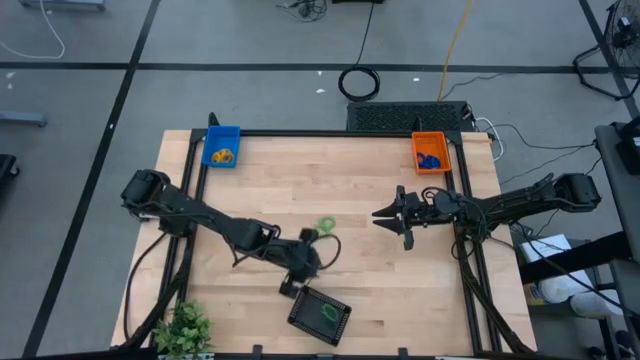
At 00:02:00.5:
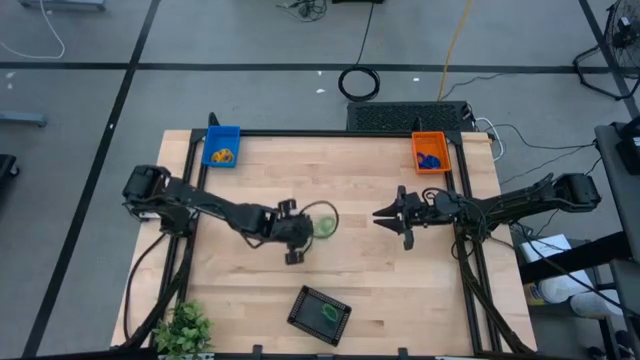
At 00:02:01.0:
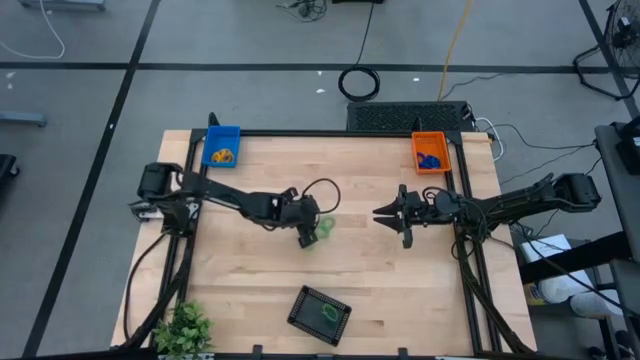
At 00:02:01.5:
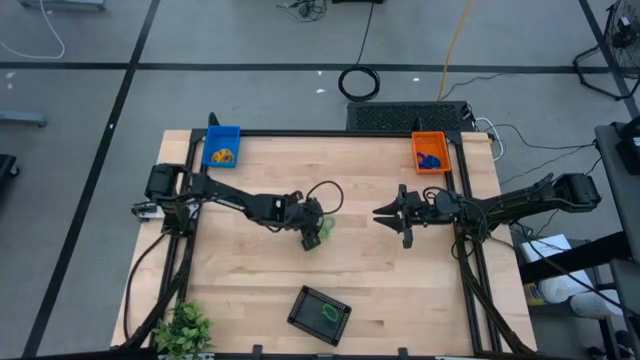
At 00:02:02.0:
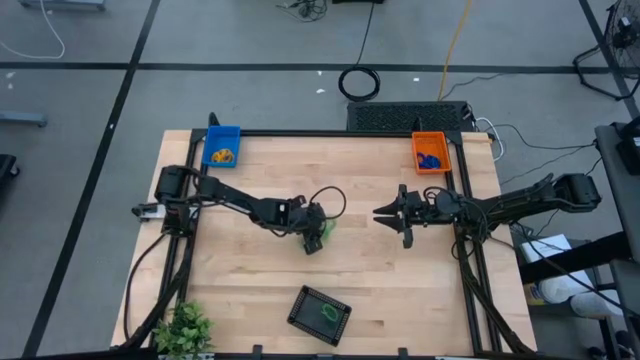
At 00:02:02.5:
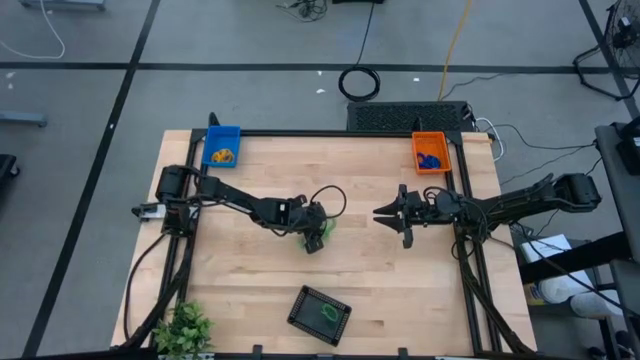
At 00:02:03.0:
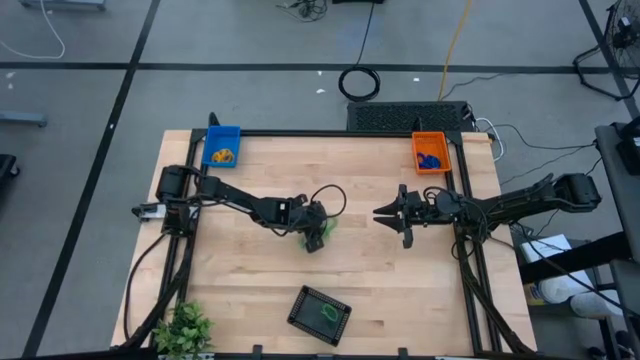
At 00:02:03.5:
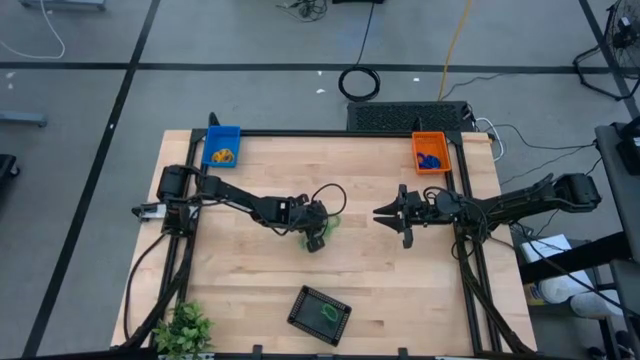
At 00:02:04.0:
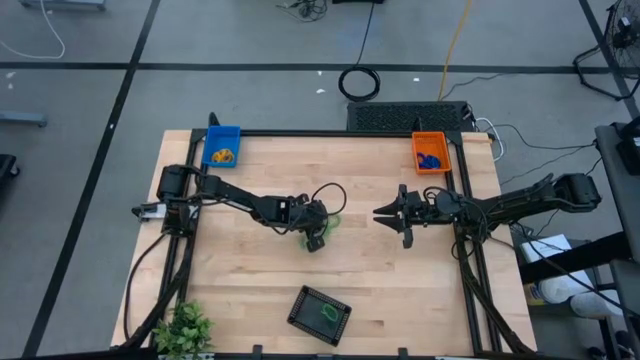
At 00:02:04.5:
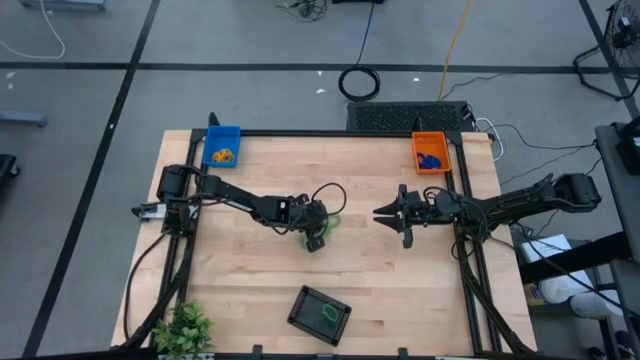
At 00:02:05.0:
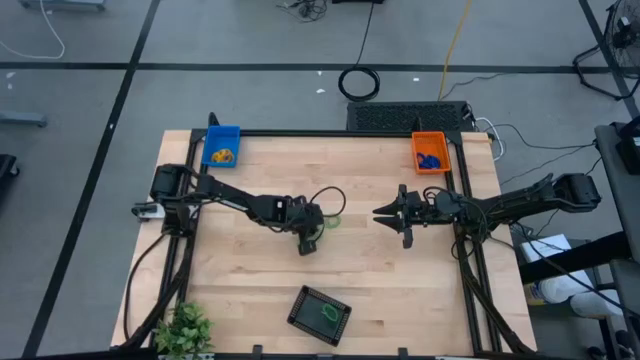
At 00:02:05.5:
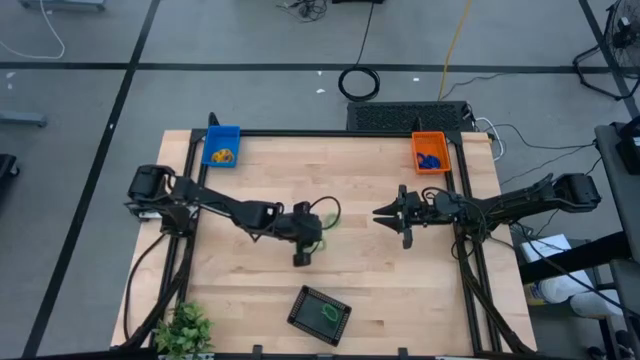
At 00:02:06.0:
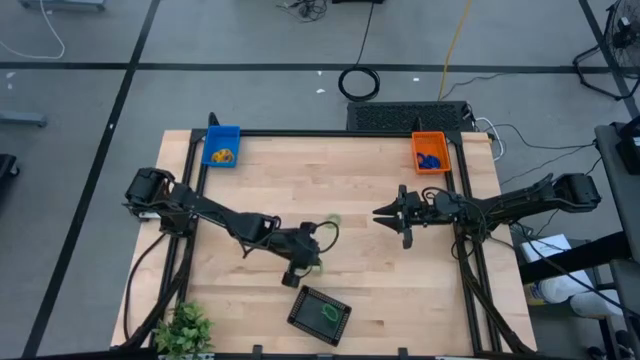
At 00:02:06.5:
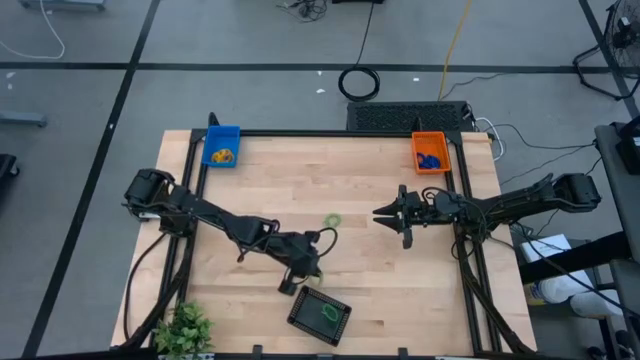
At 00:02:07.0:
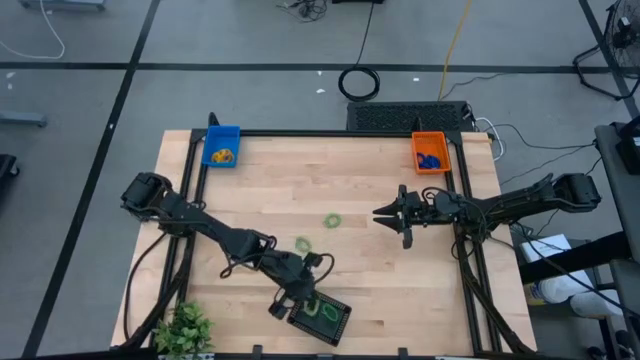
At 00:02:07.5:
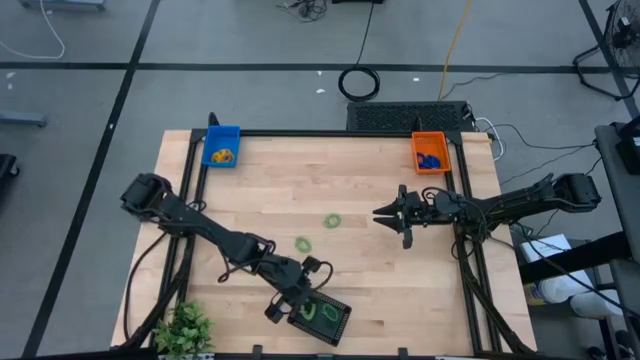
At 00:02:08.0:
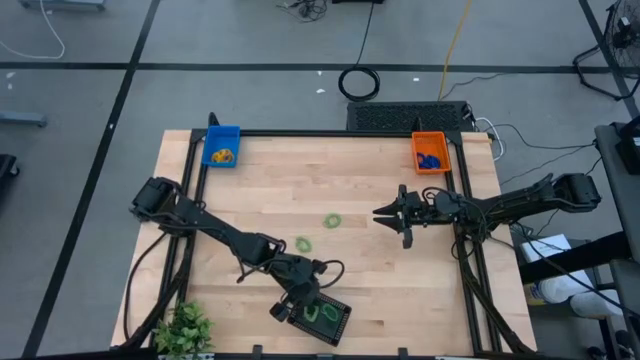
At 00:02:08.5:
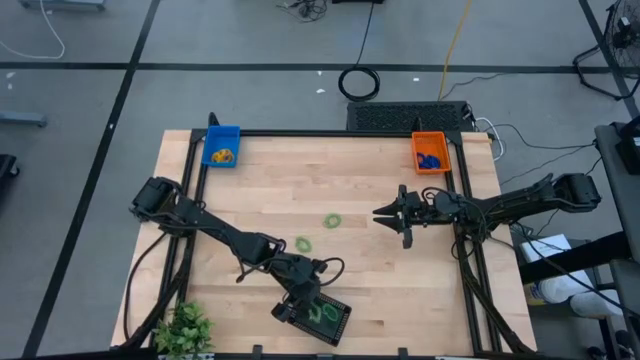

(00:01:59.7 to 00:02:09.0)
Task: Sort spring keychains into baskets
Put the green spring keychain into the black basket

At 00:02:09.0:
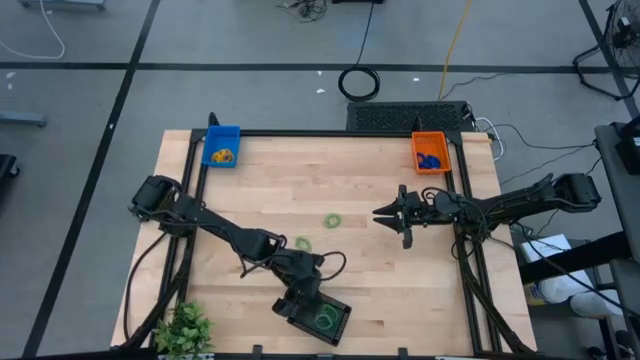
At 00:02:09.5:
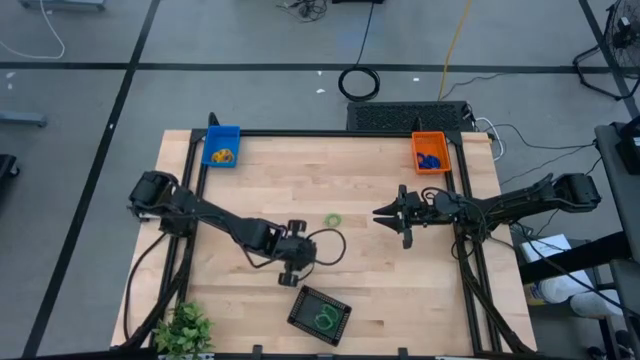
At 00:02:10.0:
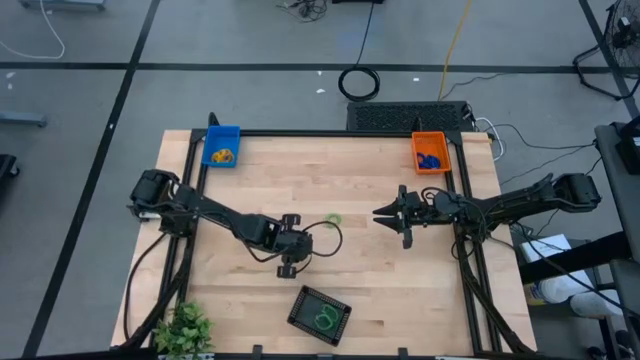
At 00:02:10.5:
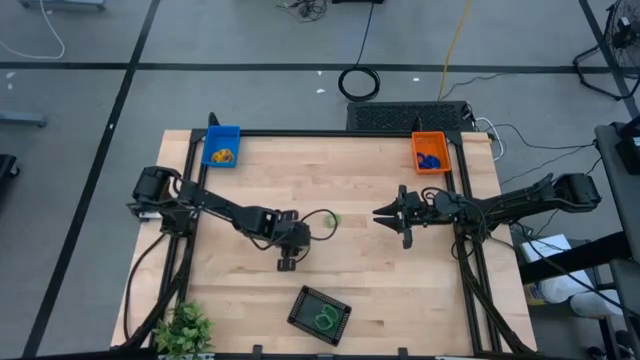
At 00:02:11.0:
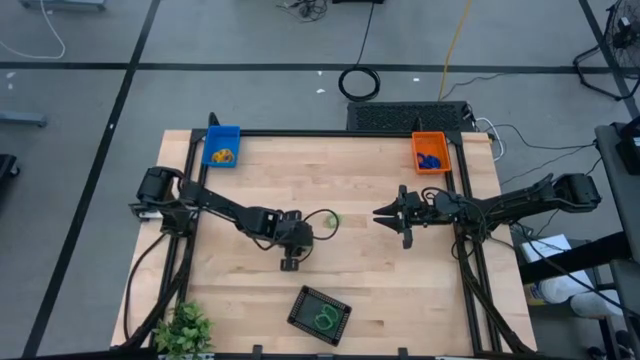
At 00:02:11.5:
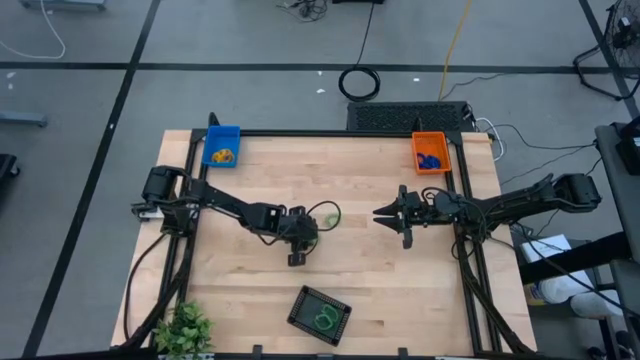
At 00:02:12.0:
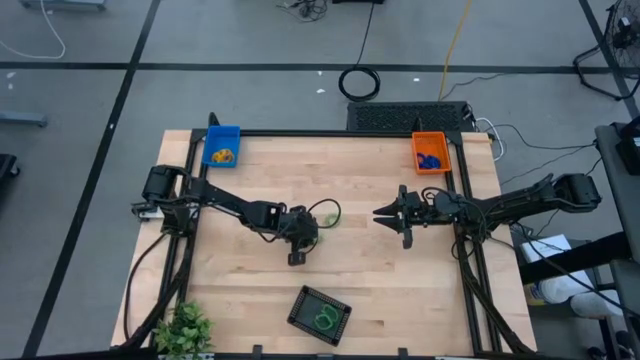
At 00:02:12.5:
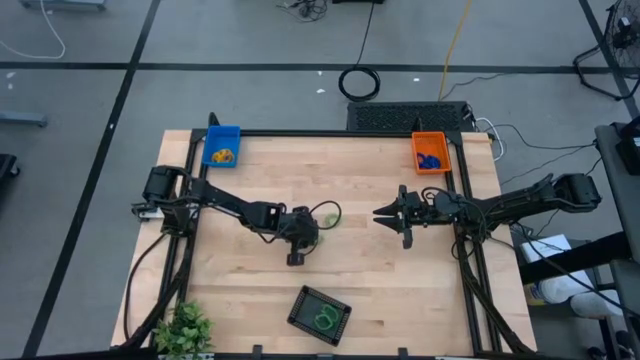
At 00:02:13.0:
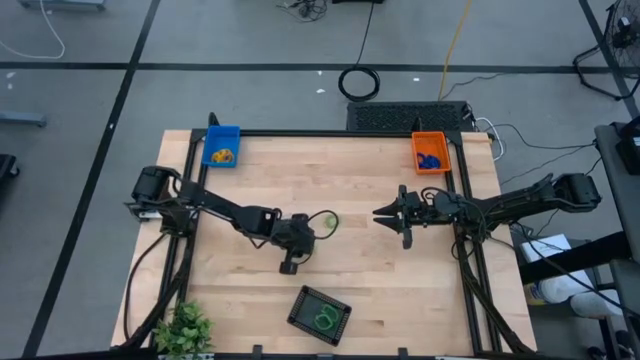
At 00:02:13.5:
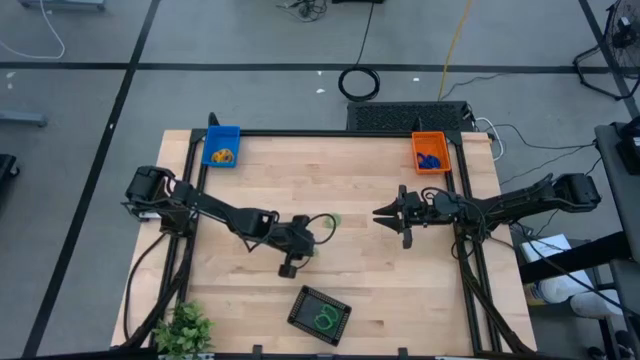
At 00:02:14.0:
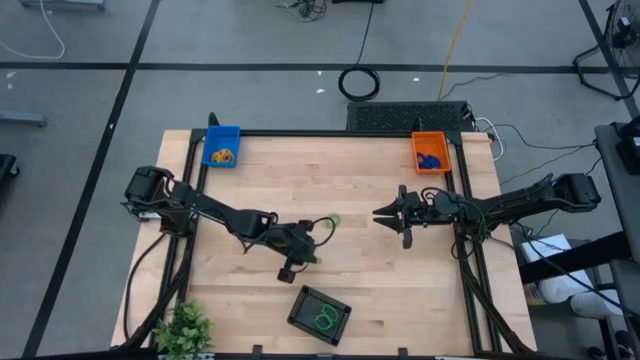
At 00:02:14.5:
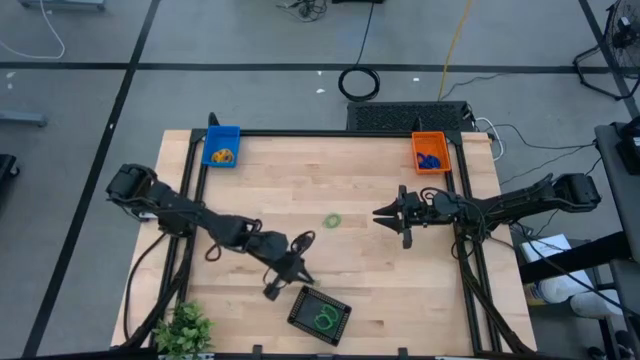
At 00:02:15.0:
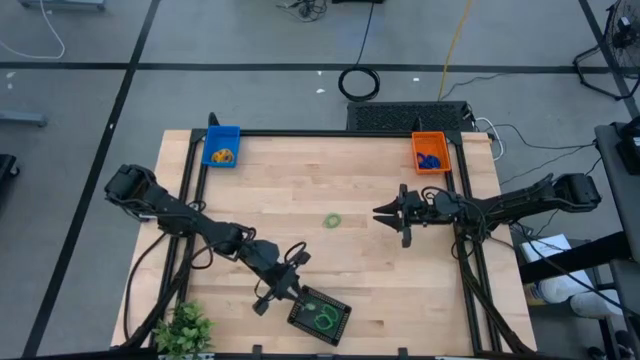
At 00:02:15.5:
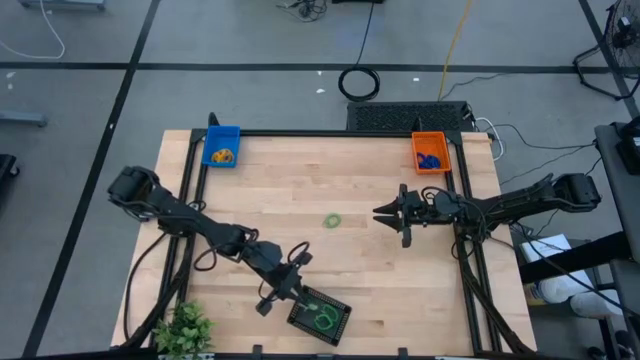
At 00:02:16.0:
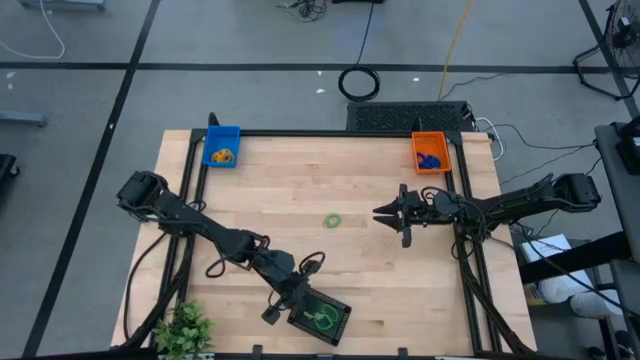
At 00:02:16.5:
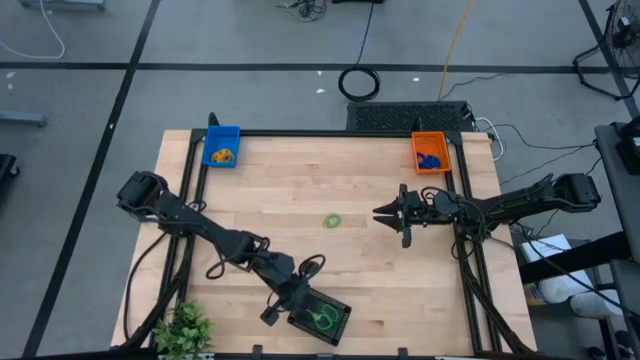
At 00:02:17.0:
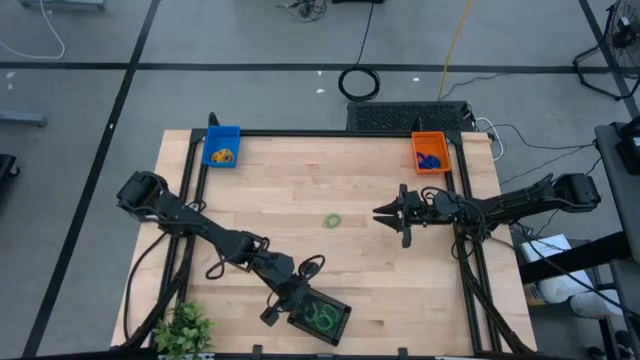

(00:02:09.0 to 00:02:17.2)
Put the green spring keychain into the black basket

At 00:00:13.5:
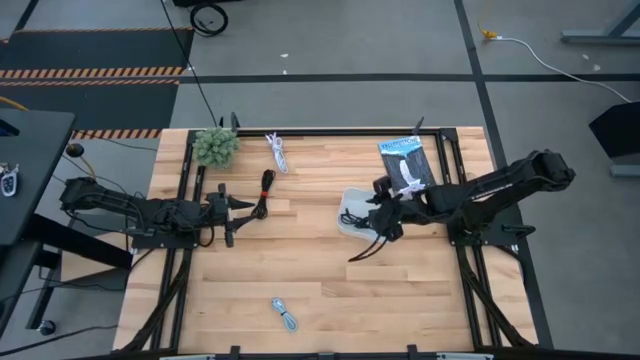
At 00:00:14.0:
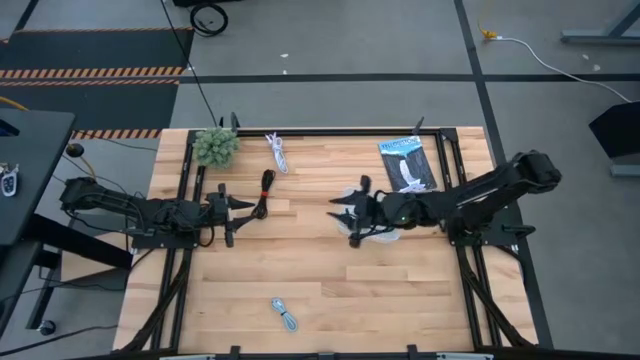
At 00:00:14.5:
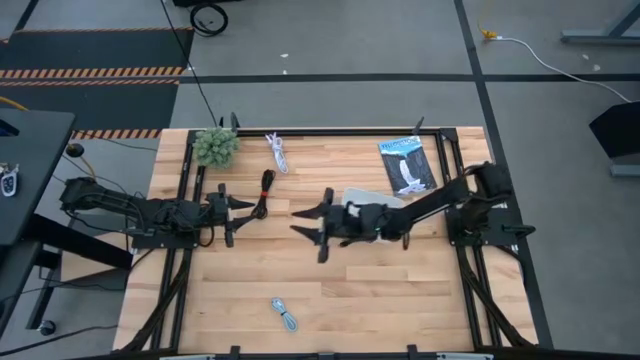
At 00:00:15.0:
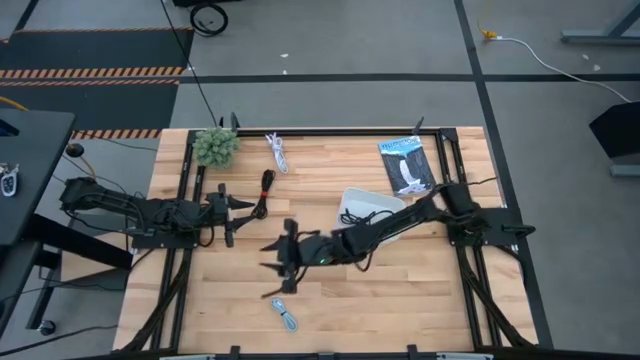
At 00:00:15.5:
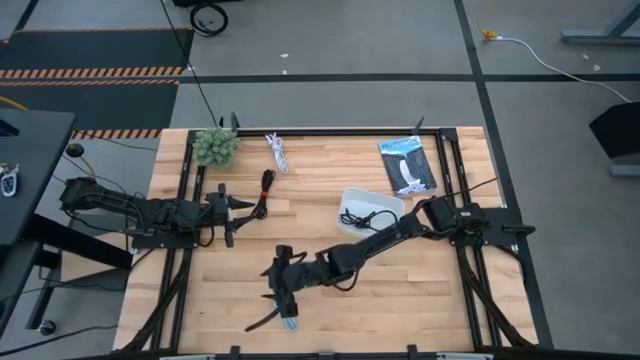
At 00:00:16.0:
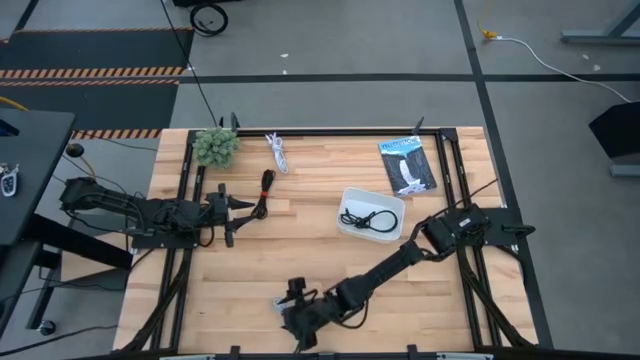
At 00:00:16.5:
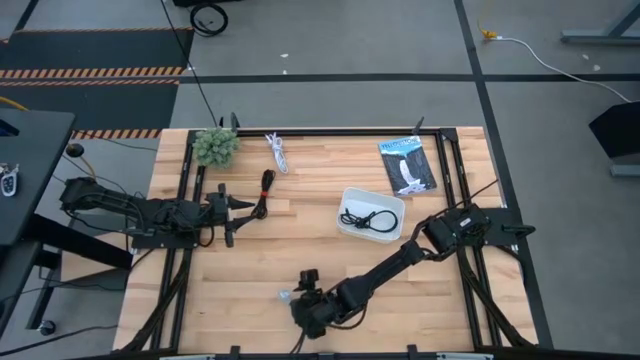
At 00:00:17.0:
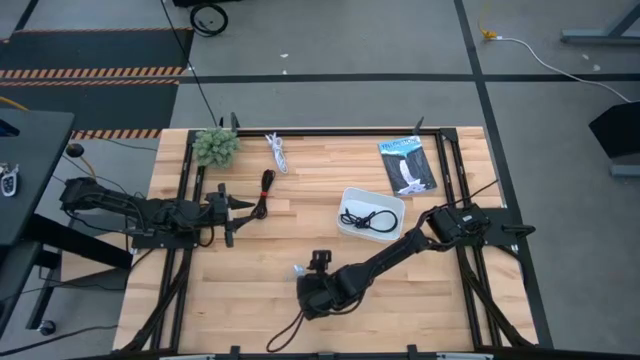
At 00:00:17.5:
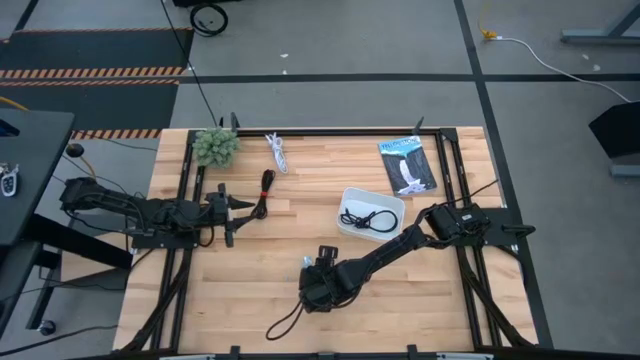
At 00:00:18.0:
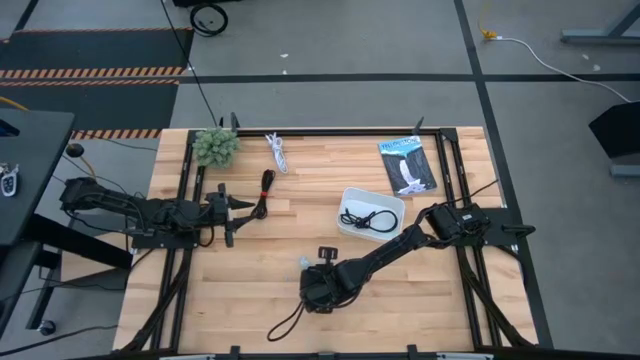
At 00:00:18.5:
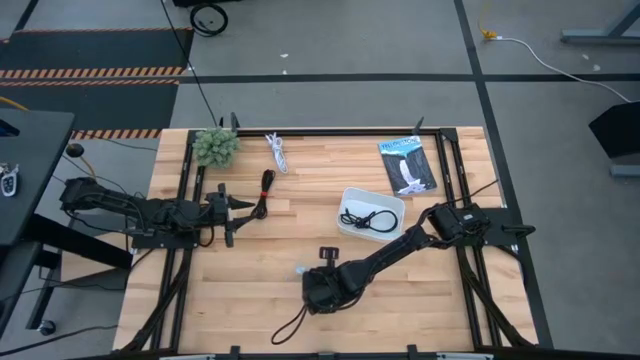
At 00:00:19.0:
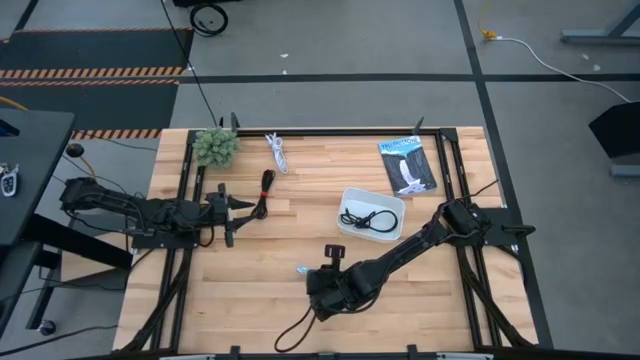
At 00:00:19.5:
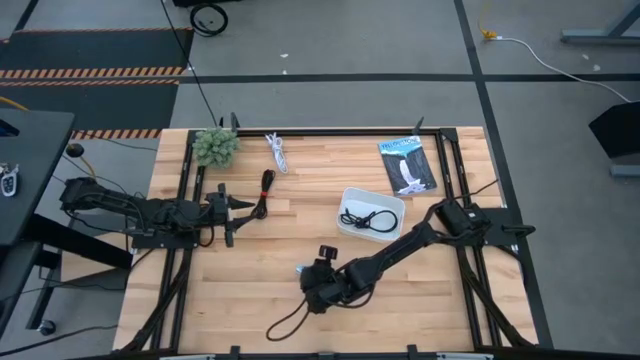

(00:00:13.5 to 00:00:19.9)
Task: Pick and place USB-C Cables
Put the light blue charger cable into the white bin
